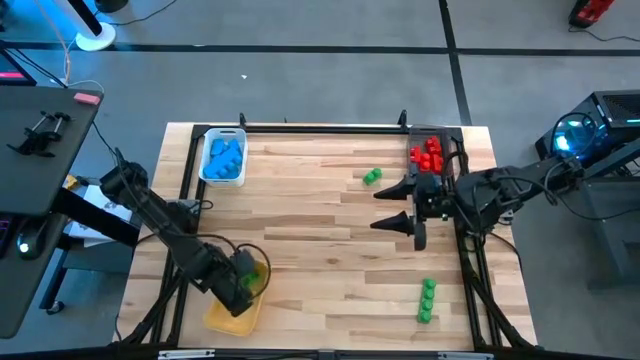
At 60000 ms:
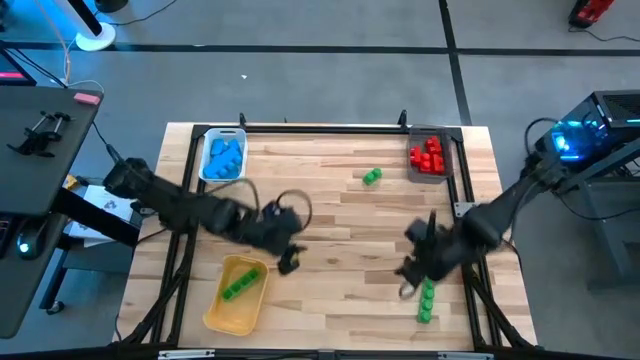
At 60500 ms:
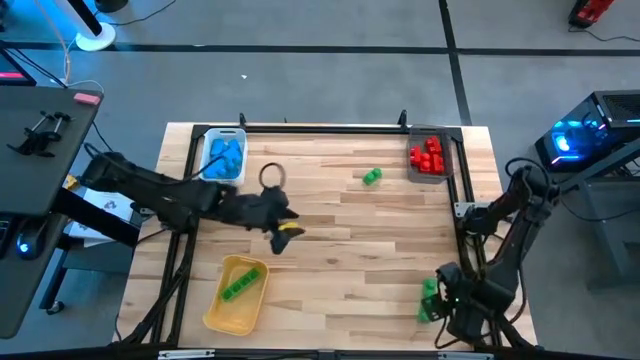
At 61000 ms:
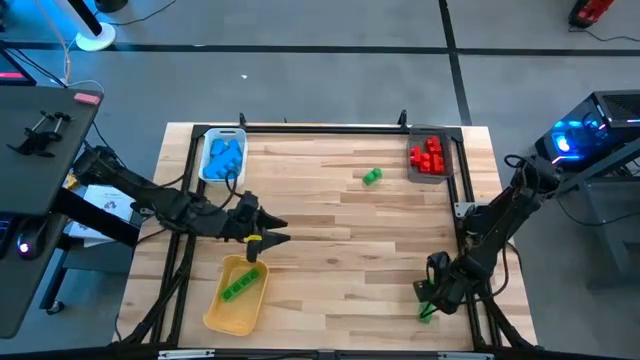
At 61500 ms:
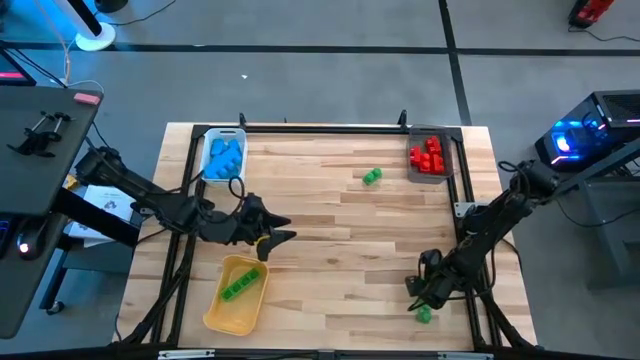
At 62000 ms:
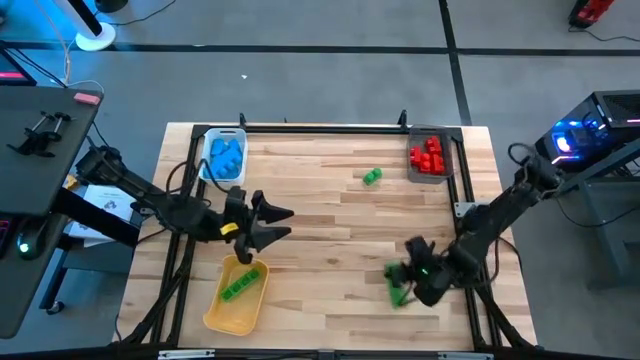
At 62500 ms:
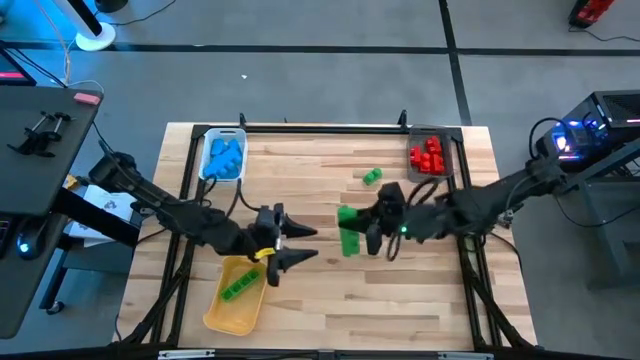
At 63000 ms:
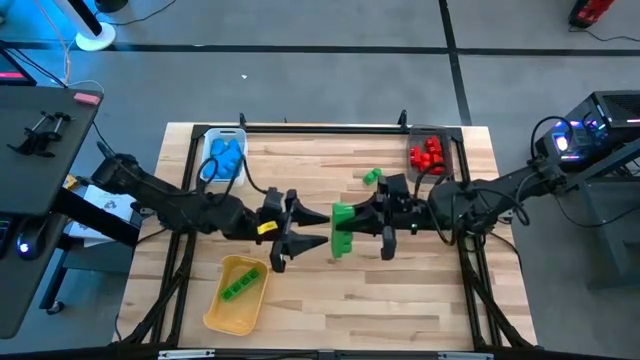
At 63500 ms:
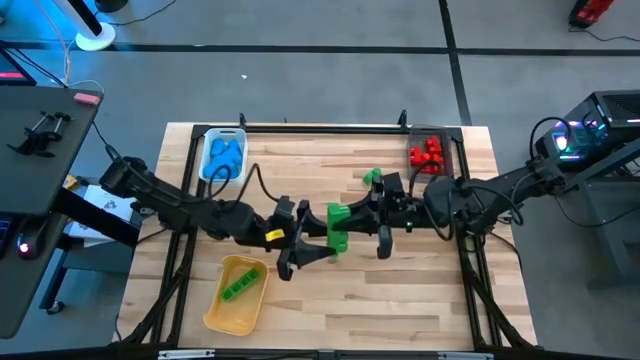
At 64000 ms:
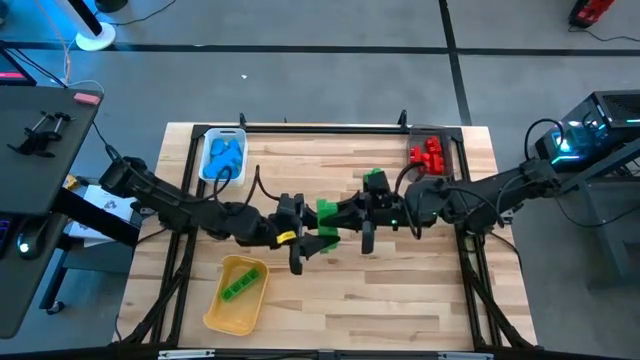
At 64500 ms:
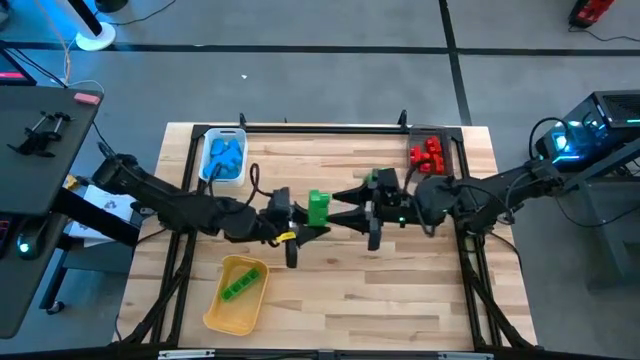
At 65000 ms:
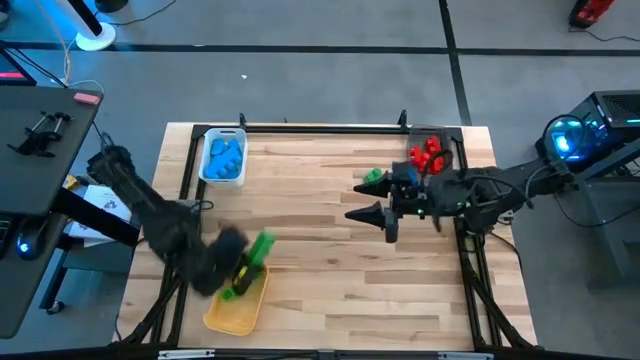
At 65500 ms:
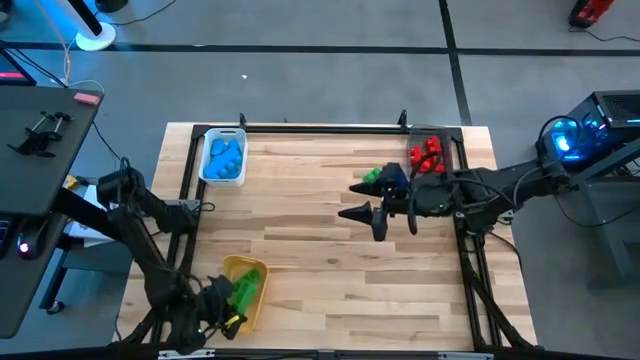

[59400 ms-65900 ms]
Task: Sort blocks
Put the green game piece into the yellow bin

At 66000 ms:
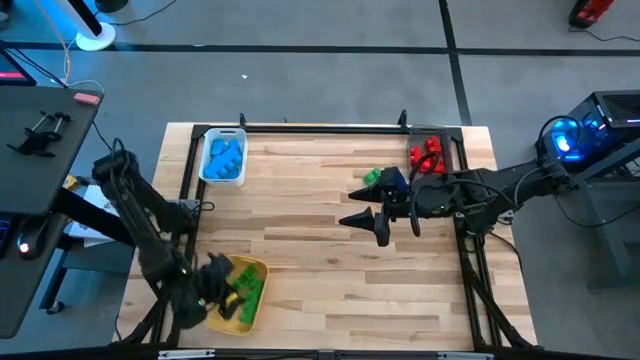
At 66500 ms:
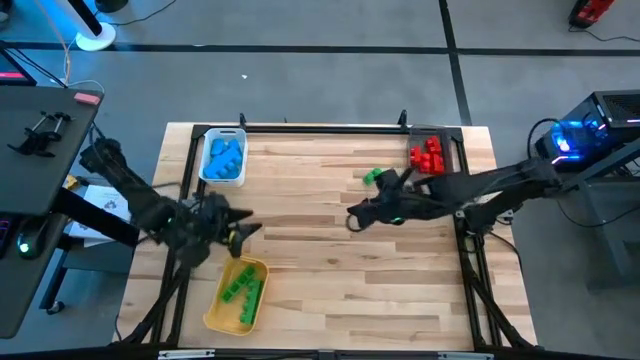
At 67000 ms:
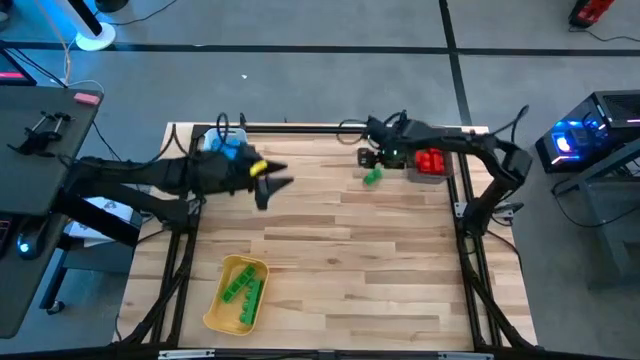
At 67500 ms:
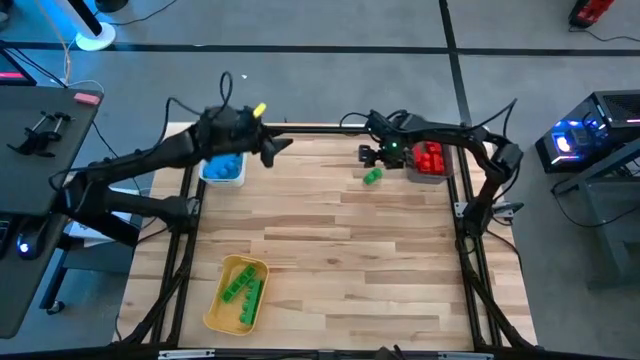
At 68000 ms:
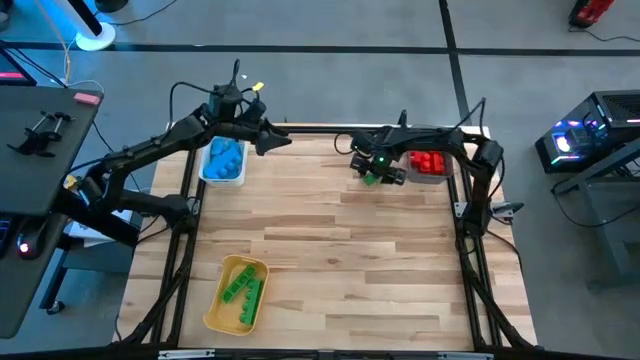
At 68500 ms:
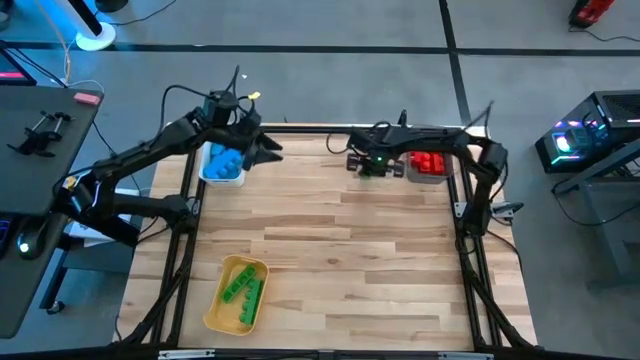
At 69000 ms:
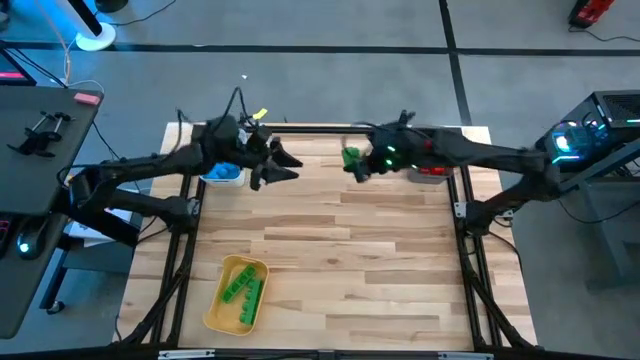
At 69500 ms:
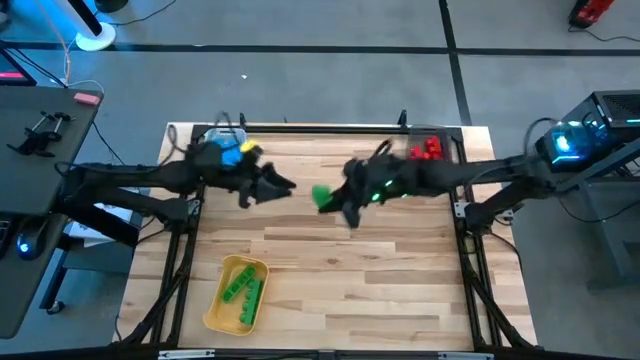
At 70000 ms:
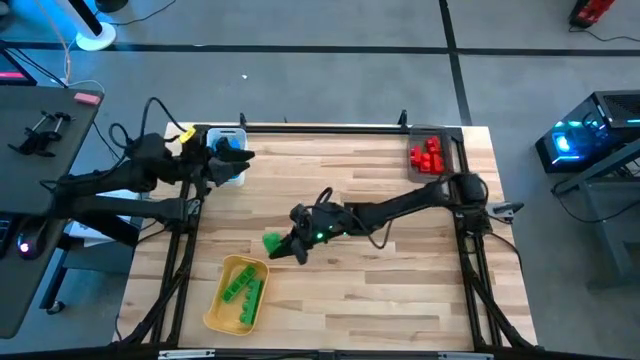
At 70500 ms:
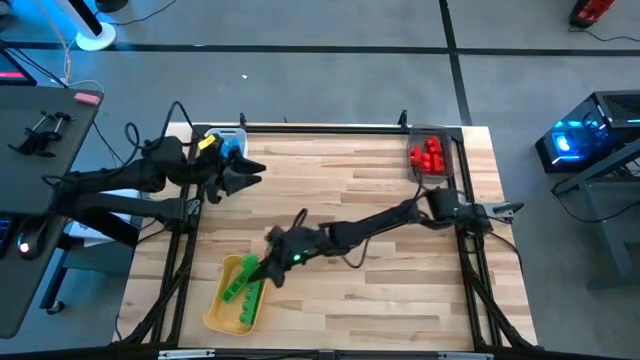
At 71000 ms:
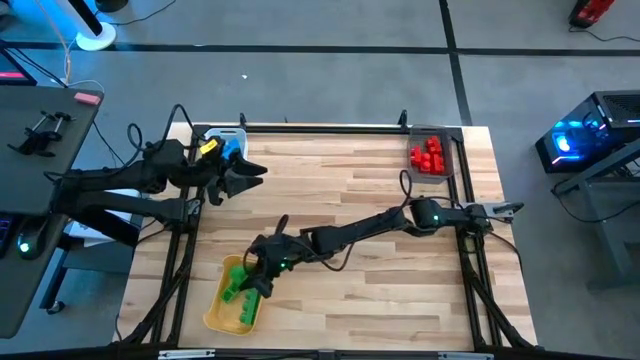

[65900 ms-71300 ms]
Put the green game piece into the yellow bin

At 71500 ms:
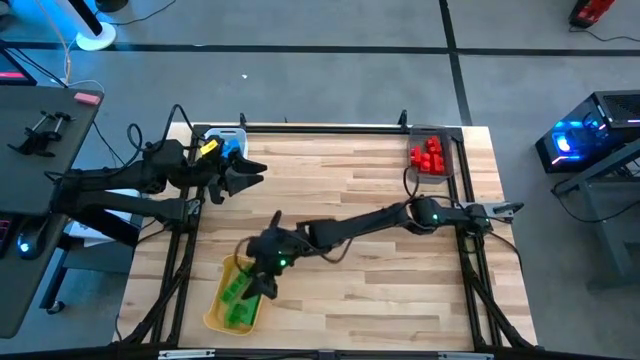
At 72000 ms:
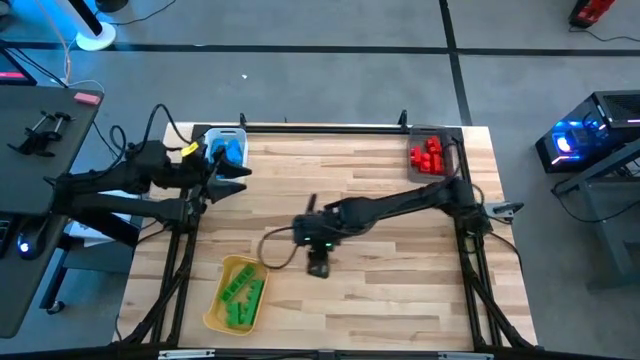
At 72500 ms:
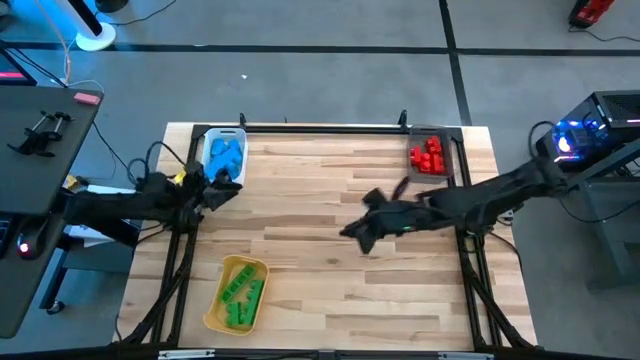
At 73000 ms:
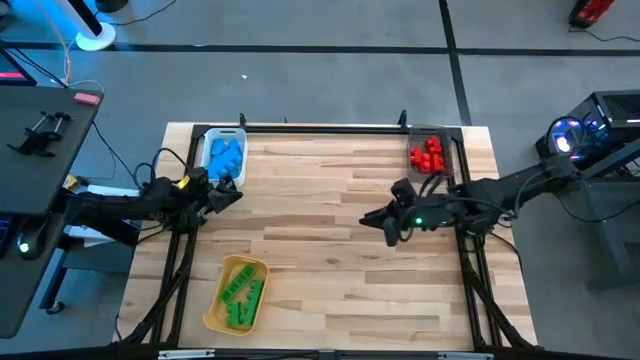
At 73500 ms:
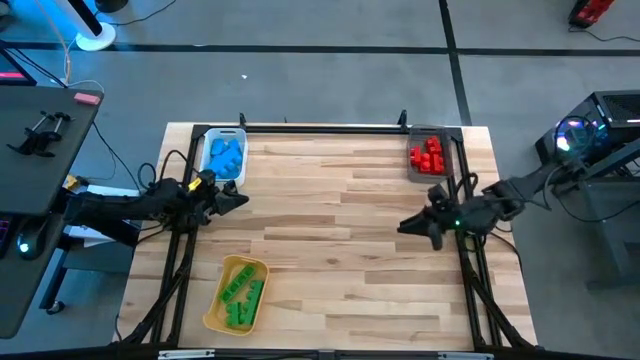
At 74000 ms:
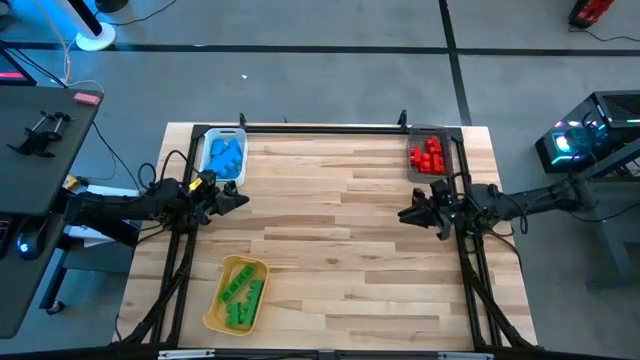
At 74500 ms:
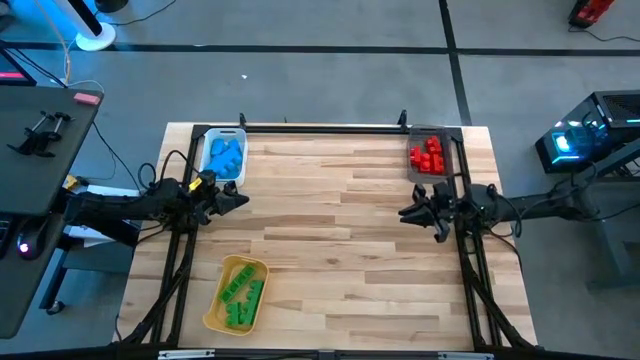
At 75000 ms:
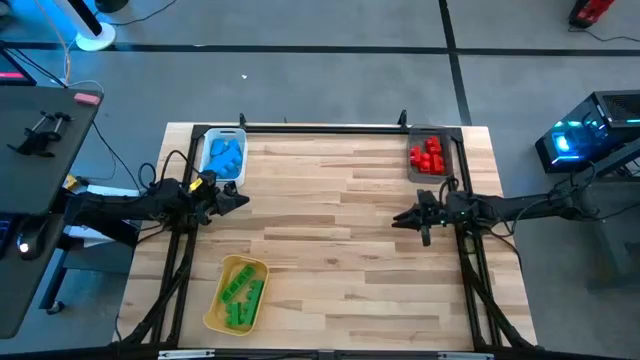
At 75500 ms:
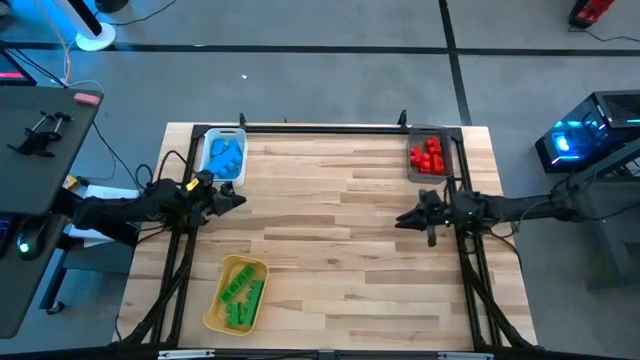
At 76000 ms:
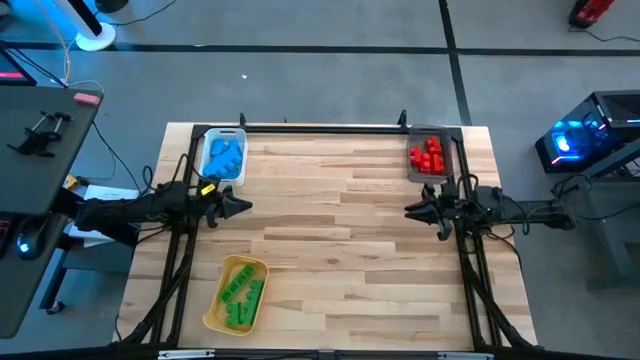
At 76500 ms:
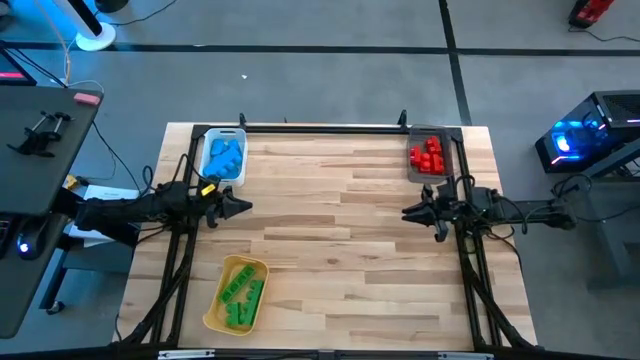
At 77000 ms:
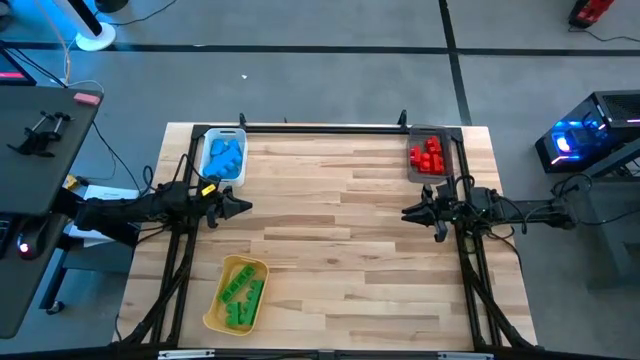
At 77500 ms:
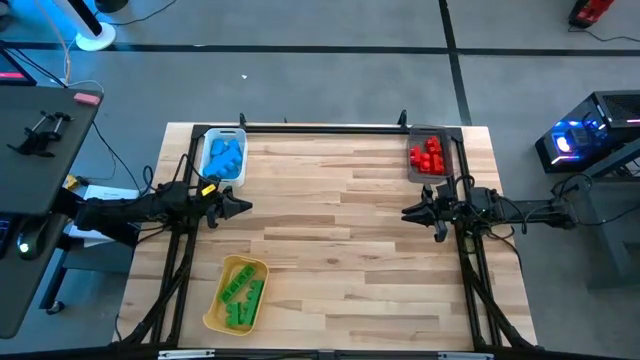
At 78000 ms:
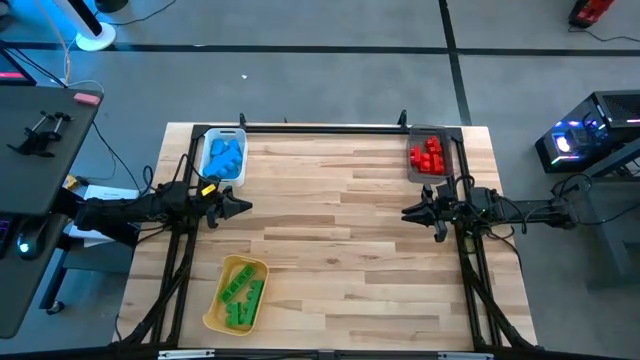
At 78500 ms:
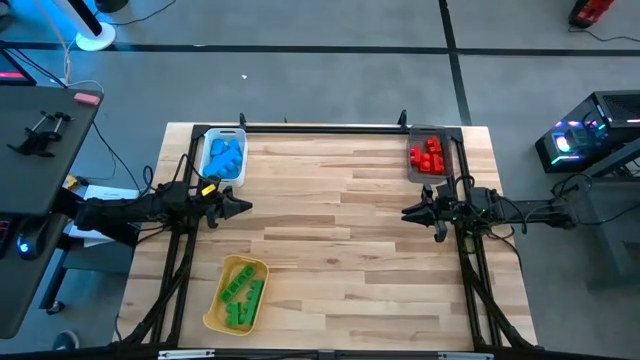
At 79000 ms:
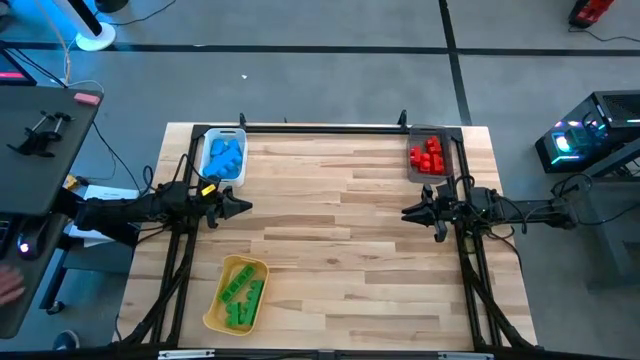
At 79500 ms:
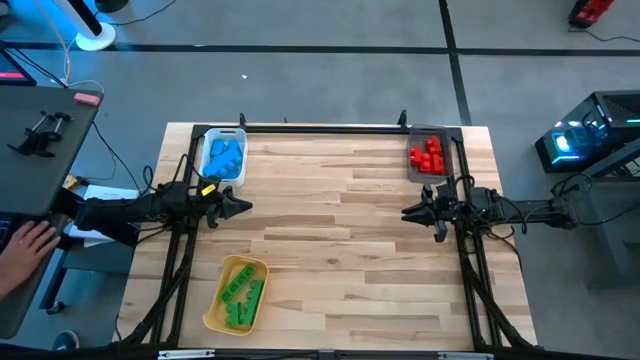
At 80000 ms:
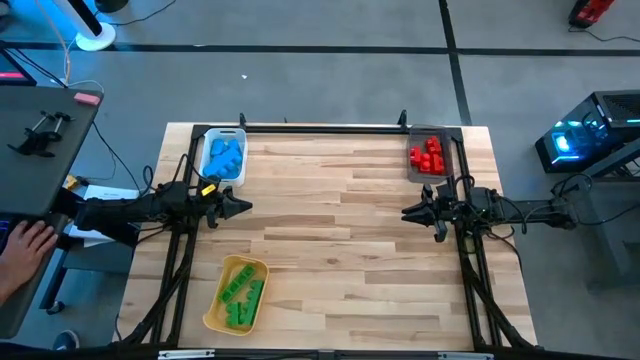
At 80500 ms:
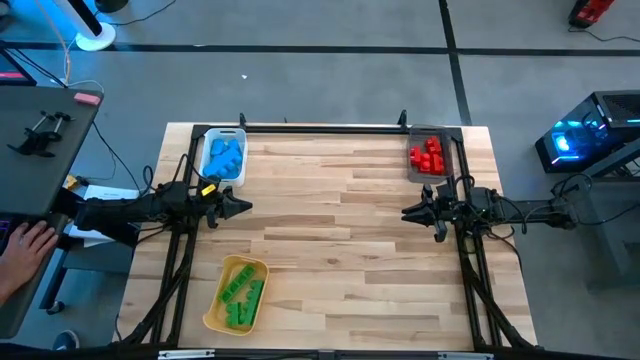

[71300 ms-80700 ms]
Return to Home Position
